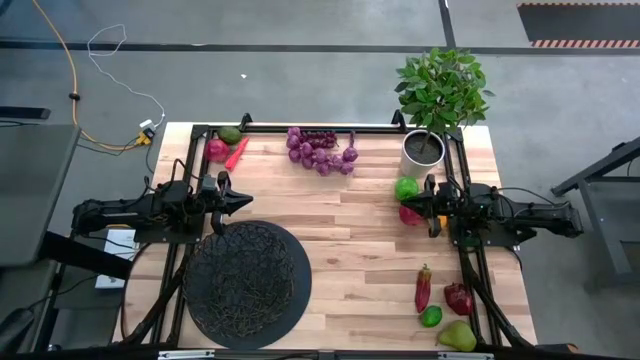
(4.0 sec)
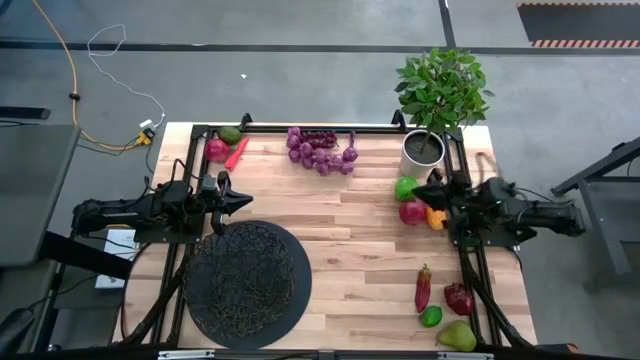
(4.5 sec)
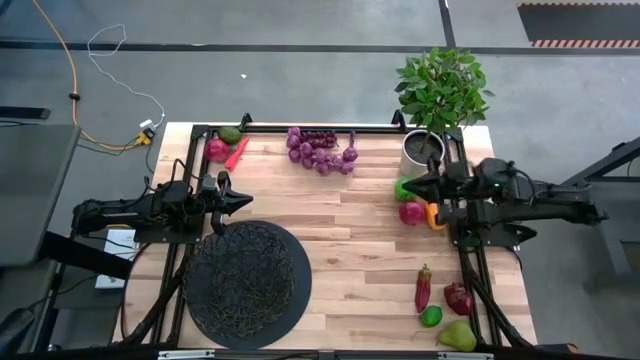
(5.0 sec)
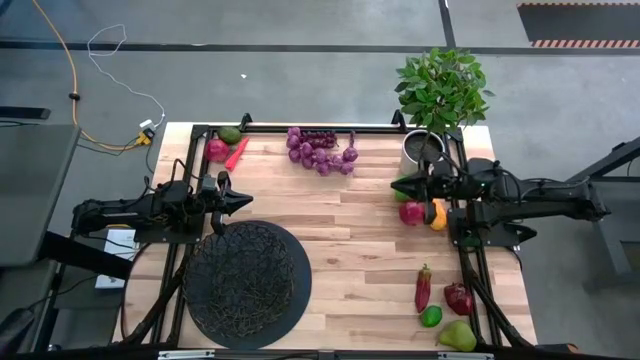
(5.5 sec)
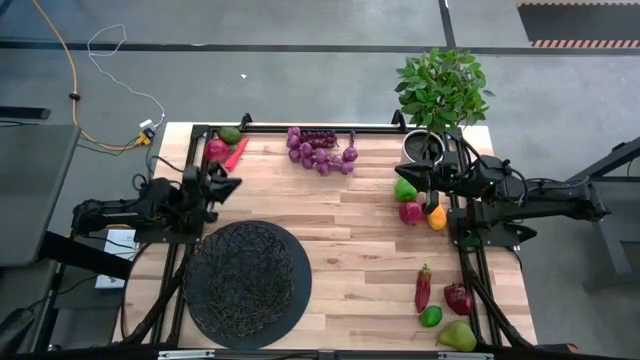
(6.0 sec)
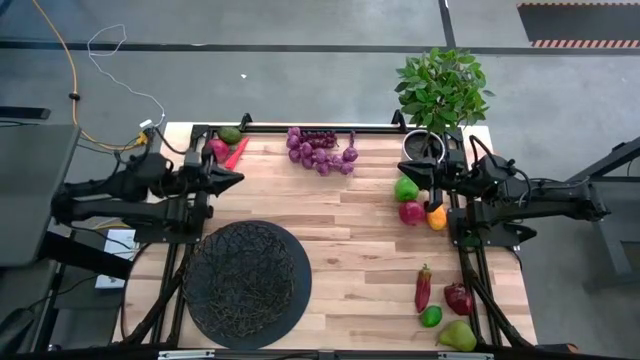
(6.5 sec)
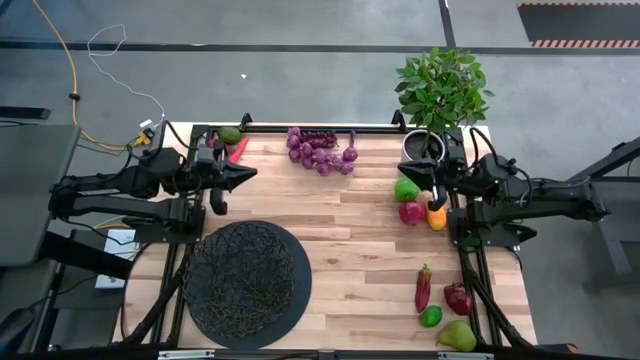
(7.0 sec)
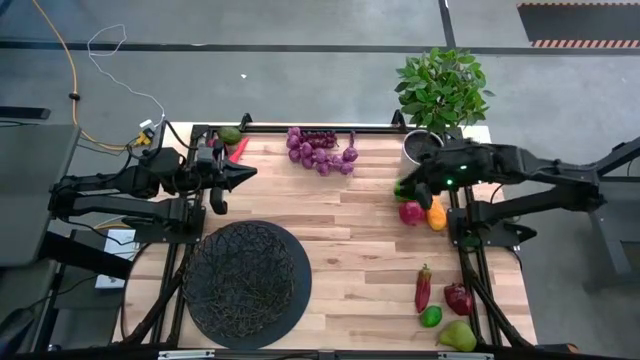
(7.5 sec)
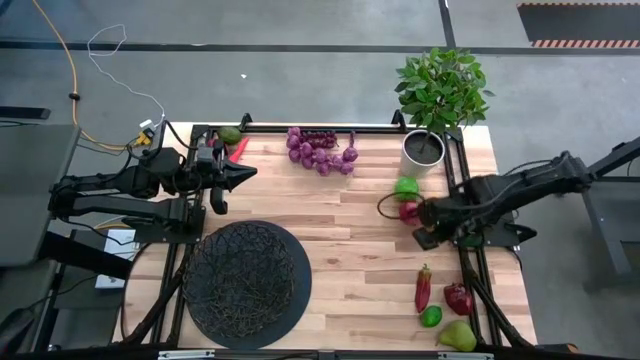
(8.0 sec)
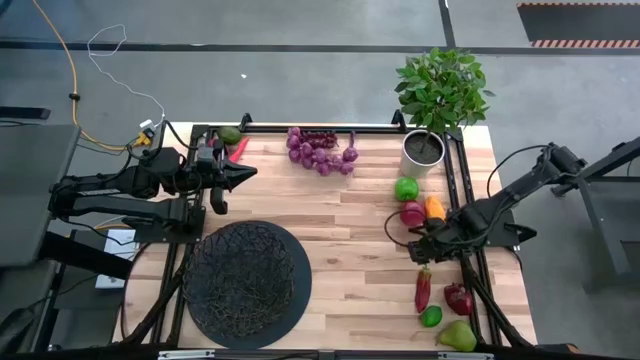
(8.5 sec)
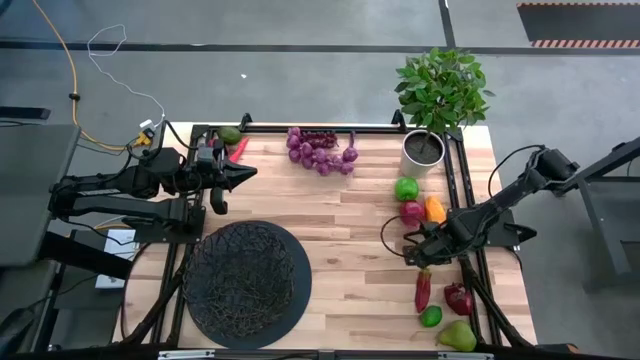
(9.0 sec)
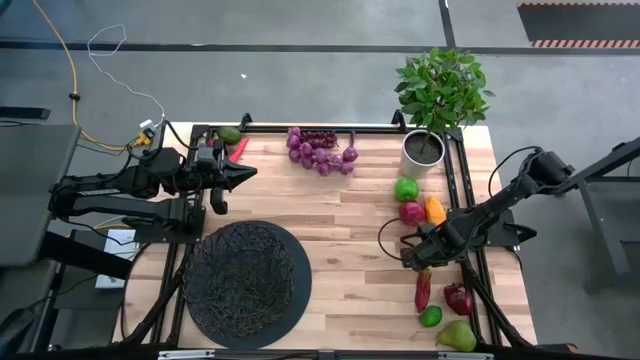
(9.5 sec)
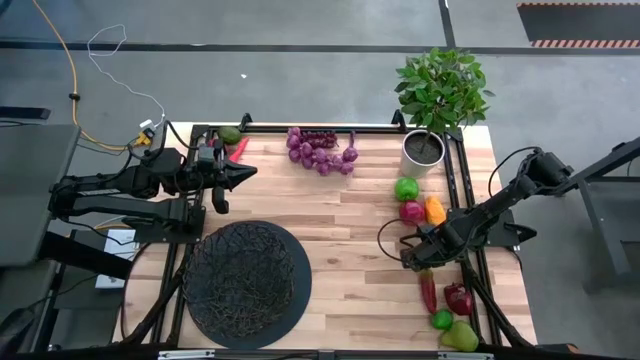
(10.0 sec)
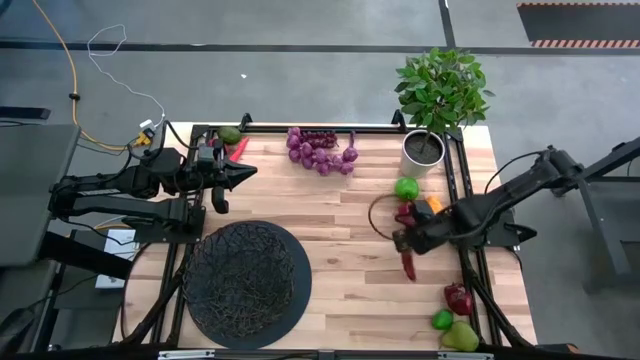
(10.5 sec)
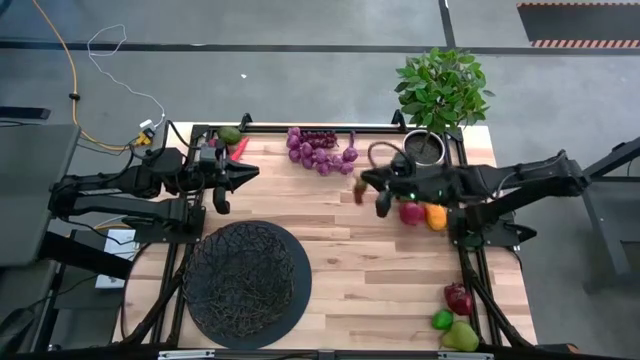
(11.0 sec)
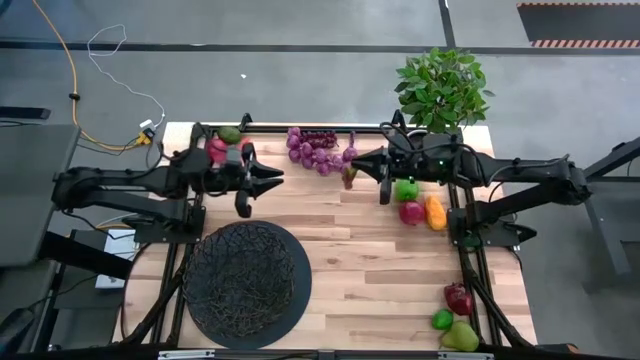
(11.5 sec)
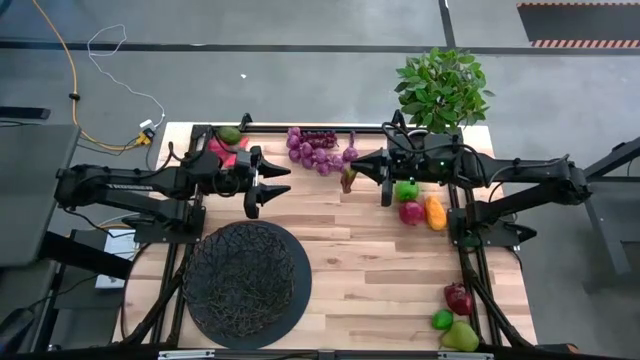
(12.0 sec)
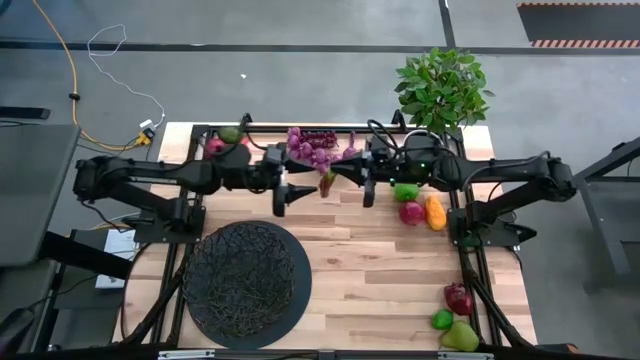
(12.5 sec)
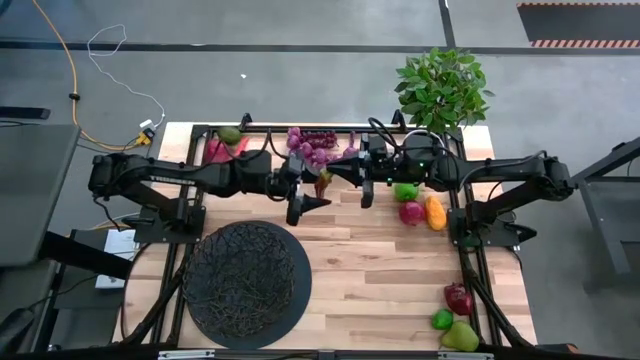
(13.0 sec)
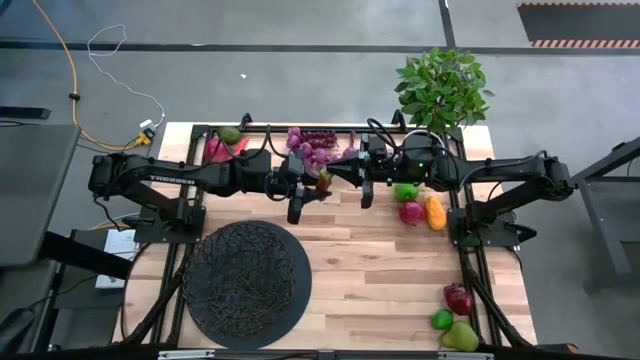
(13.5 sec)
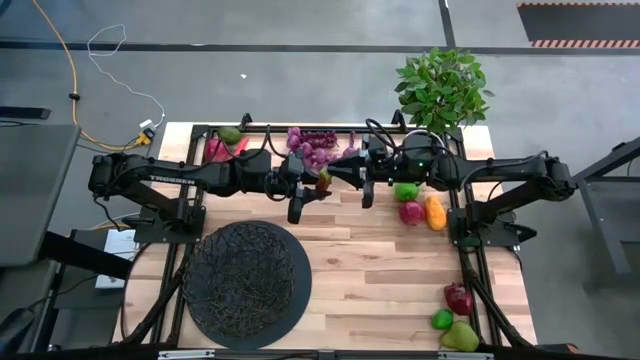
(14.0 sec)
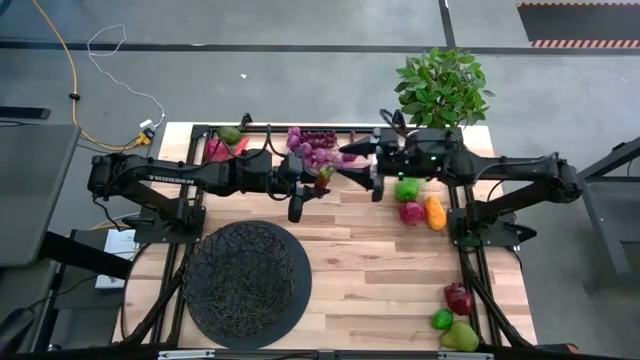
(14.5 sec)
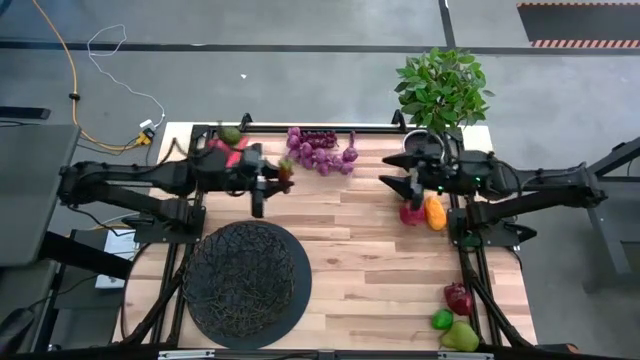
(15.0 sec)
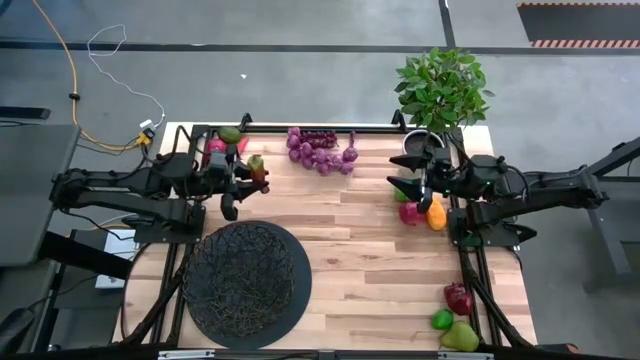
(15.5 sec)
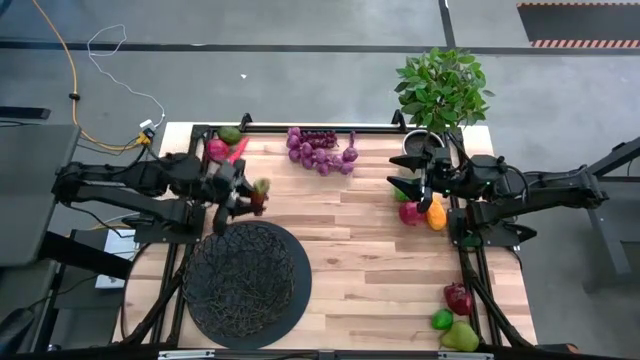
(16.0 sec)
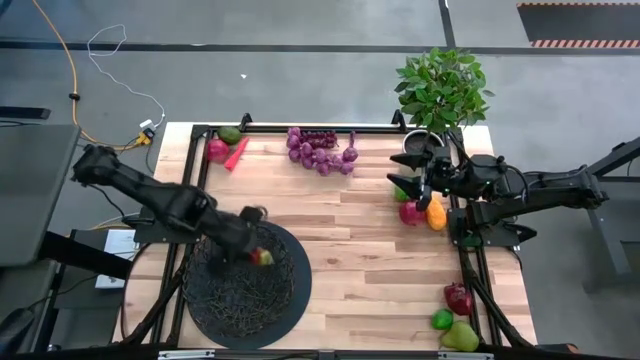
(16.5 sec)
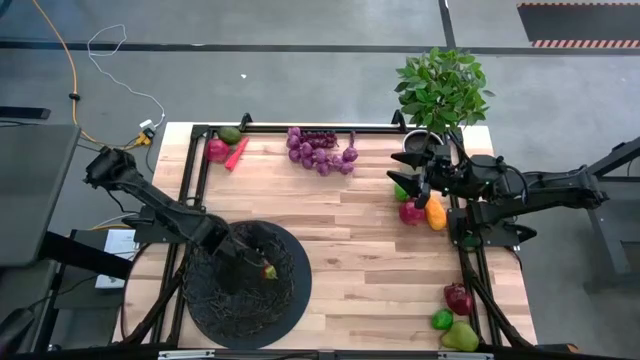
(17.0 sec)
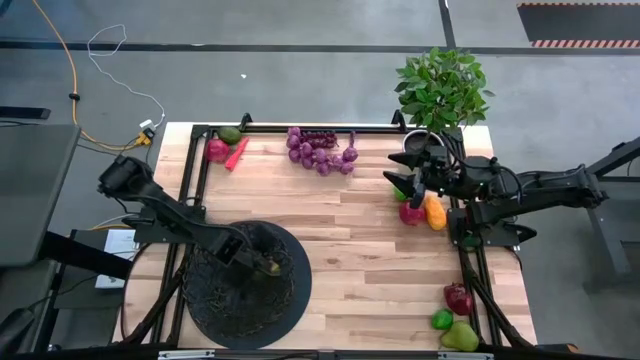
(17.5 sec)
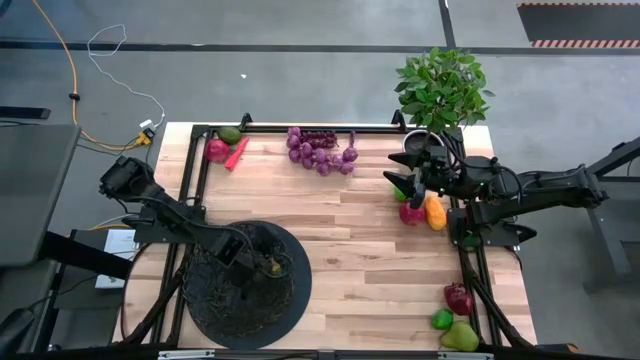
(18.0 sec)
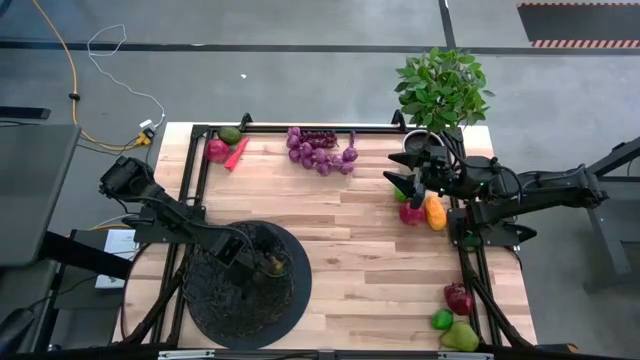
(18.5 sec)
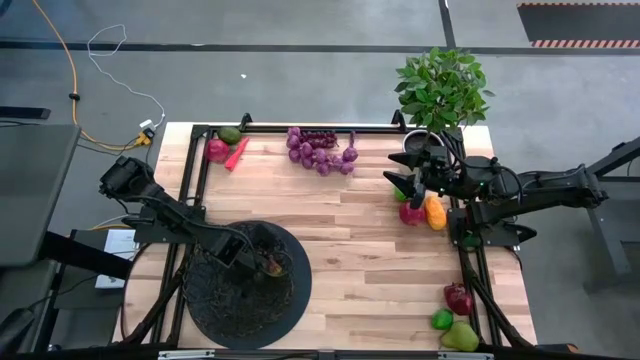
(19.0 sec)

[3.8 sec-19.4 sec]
Task: Build produce basket
Put the bottom red chili pepper into the black basket

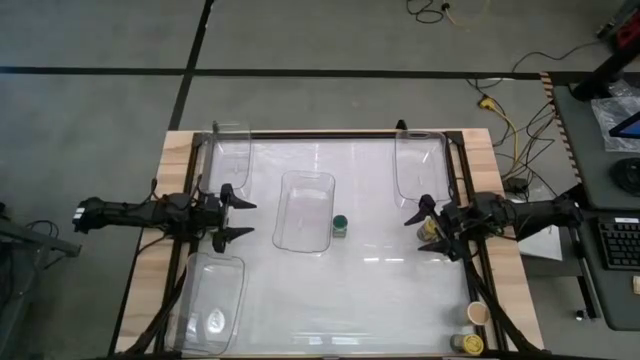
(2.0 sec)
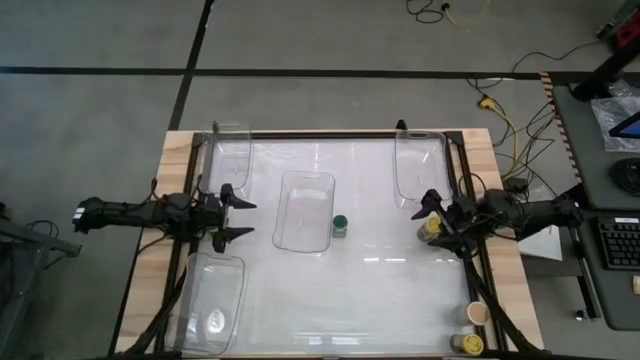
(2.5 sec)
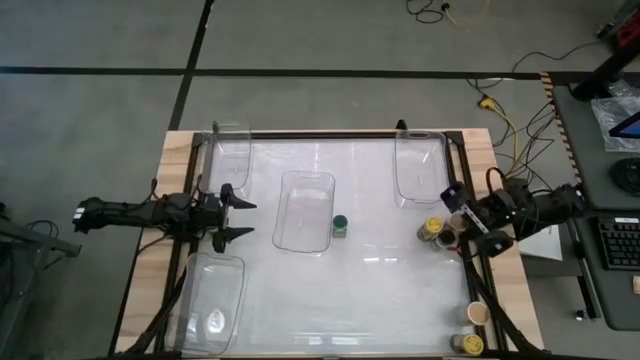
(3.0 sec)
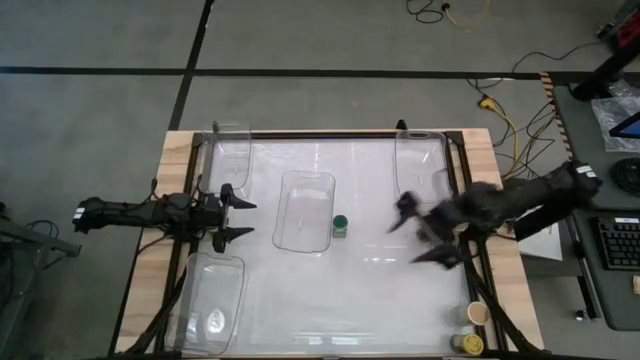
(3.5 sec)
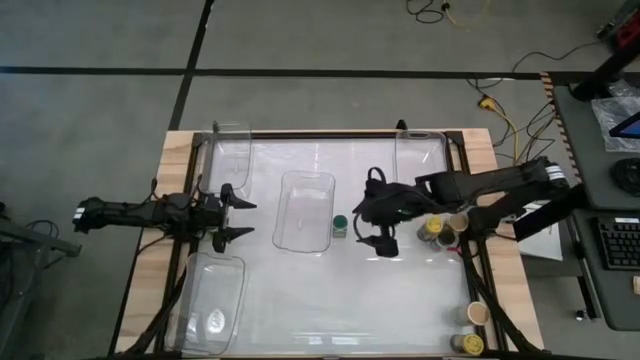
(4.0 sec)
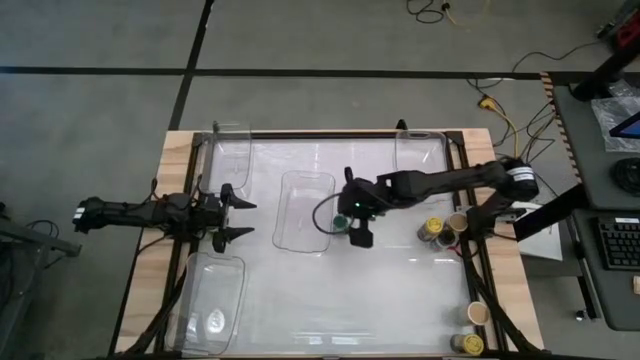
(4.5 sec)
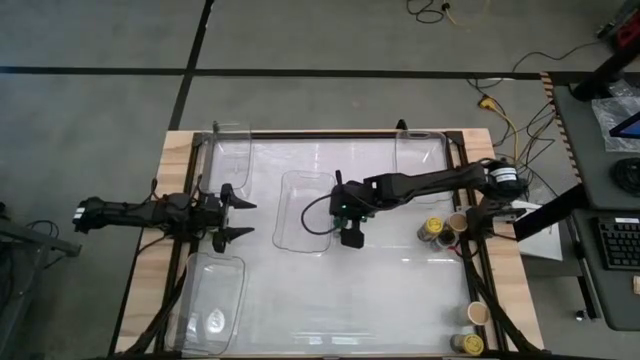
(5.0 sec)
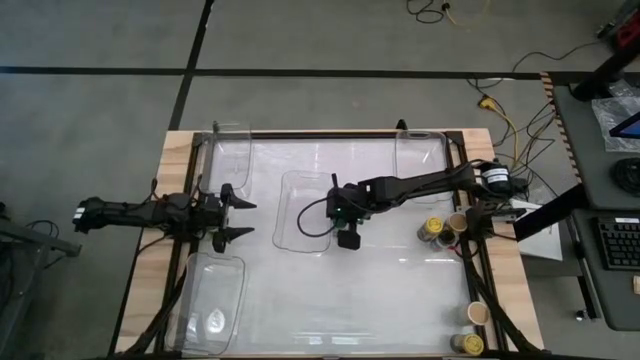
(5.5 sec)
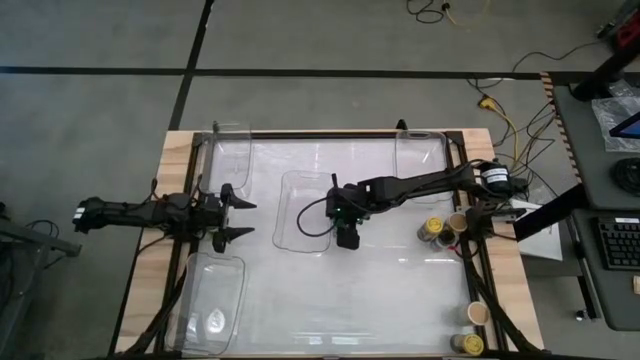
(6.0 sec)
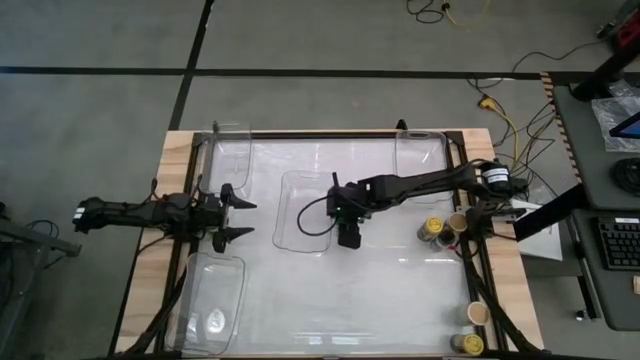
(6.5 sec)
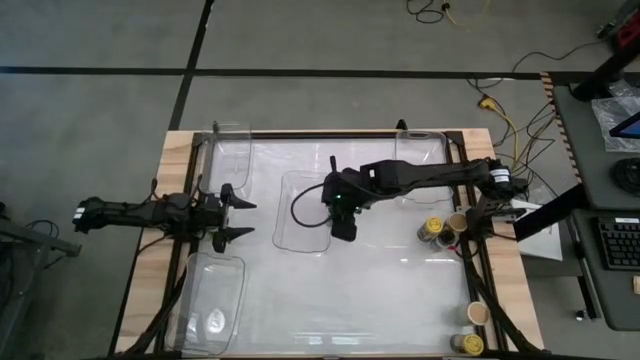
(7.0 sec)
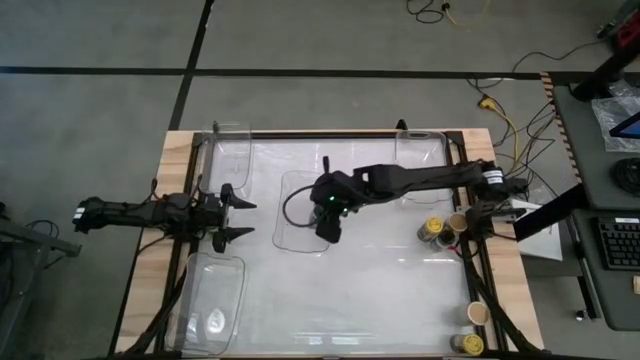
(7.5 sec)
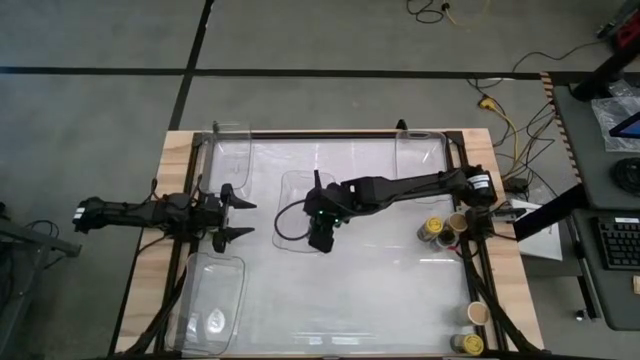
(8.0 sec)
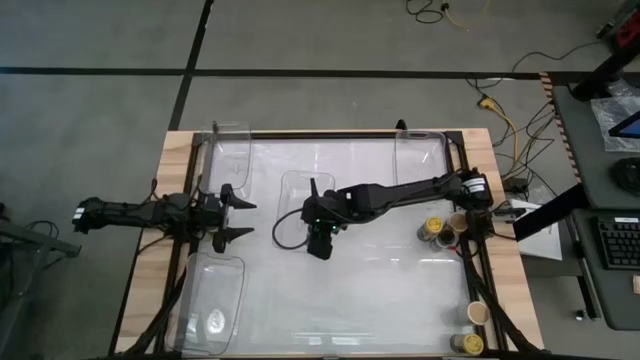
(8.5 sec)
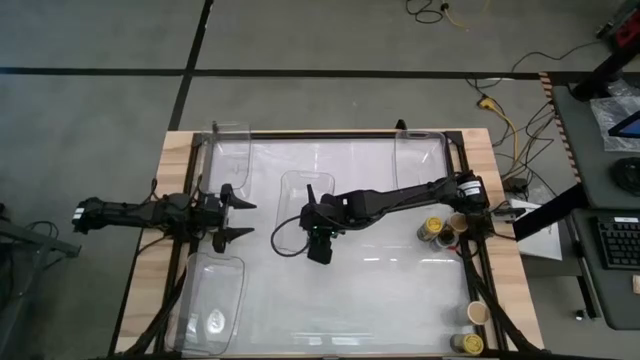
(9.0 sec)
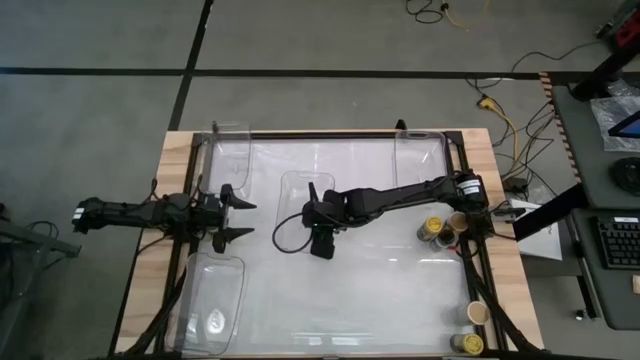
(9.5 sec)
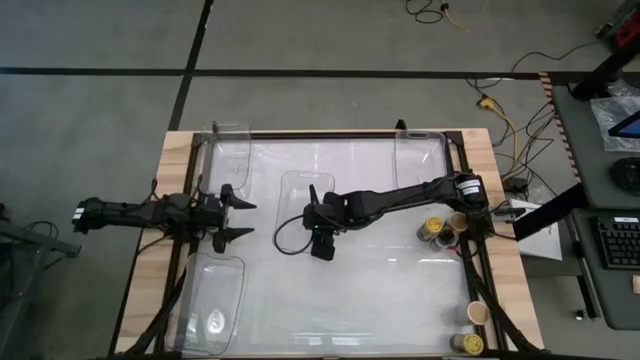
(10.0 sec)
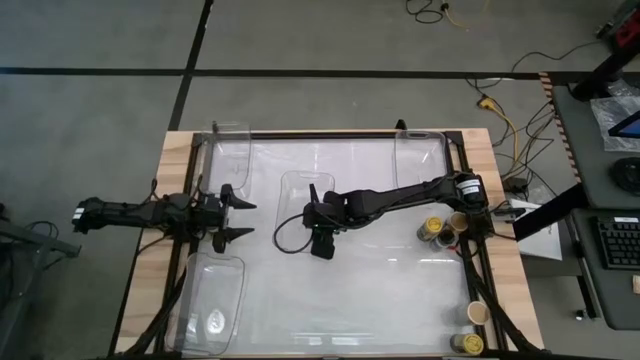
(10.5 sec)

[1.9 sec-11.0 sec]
Task: Sort spices by type
Put the right green seasoning bottle into the center transparent bin
